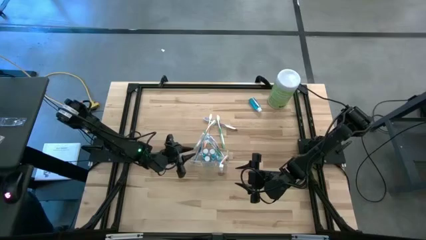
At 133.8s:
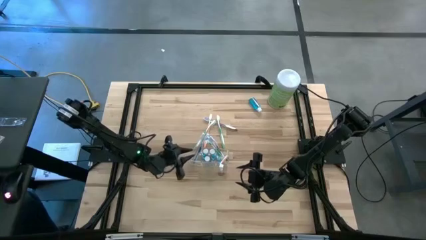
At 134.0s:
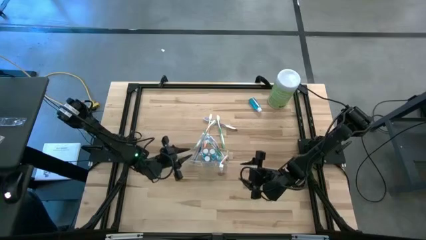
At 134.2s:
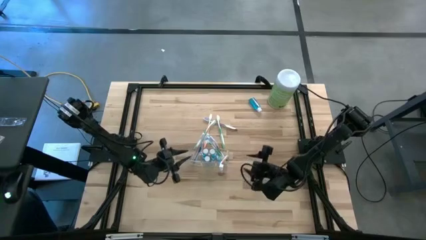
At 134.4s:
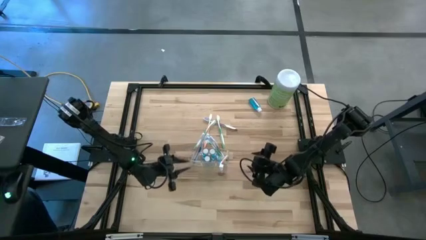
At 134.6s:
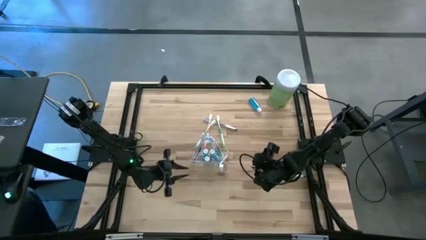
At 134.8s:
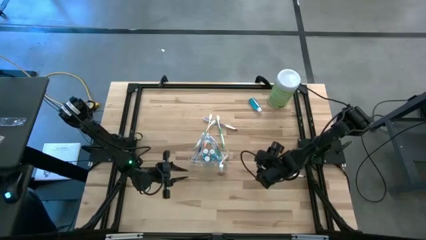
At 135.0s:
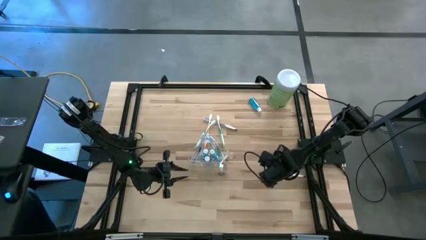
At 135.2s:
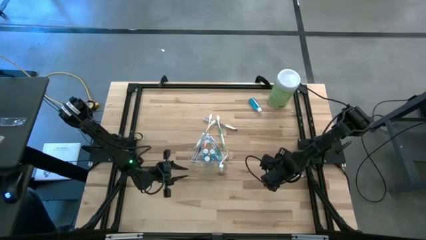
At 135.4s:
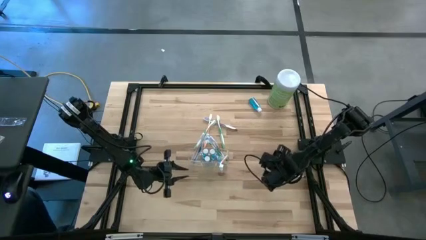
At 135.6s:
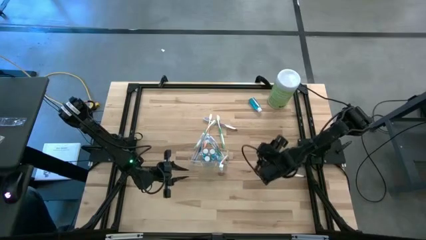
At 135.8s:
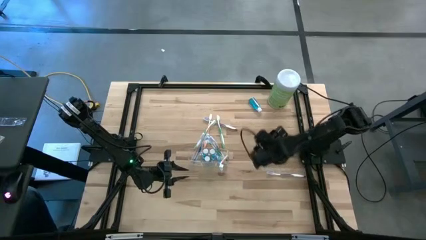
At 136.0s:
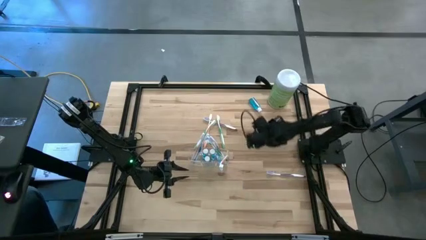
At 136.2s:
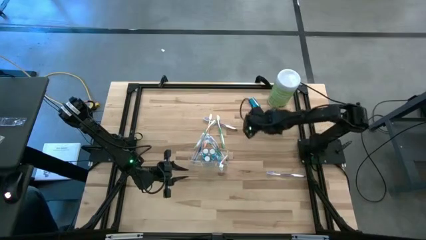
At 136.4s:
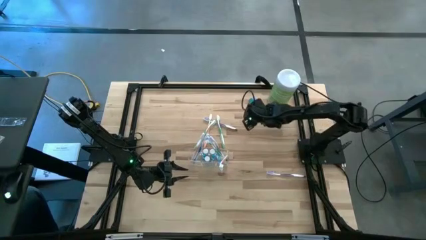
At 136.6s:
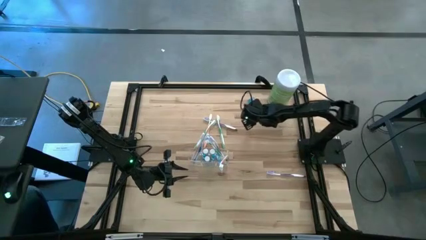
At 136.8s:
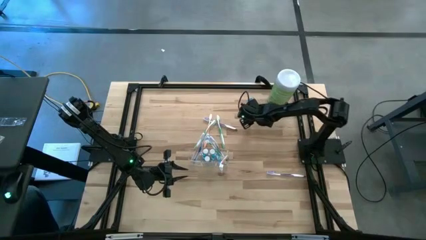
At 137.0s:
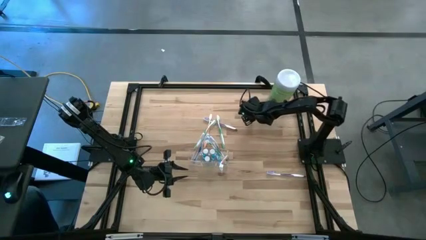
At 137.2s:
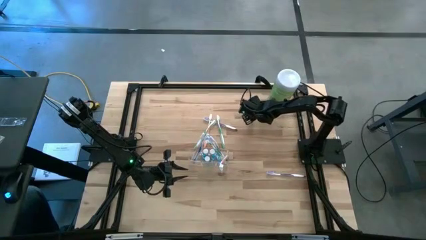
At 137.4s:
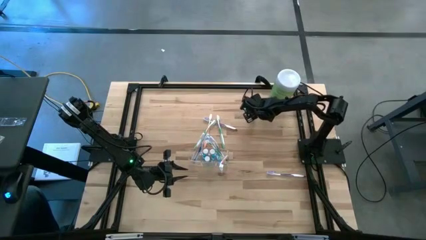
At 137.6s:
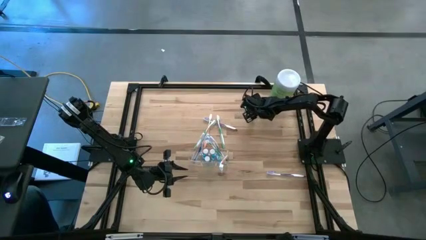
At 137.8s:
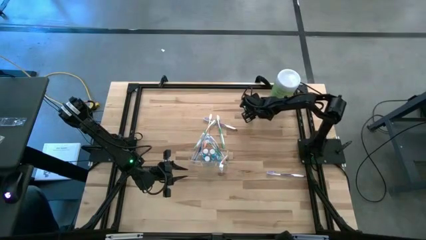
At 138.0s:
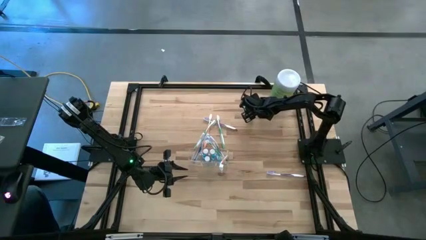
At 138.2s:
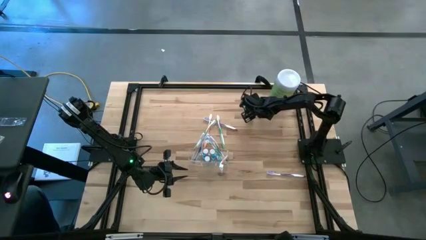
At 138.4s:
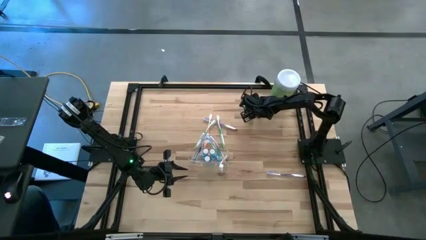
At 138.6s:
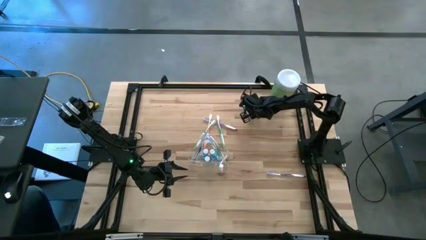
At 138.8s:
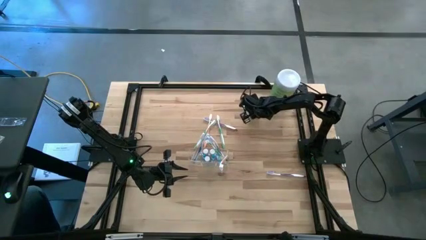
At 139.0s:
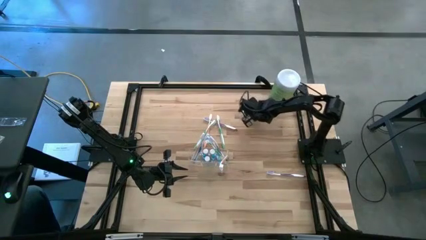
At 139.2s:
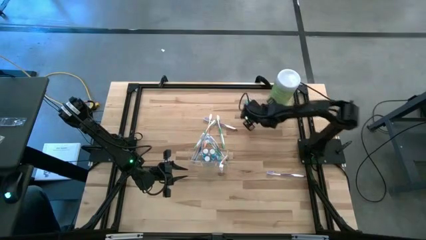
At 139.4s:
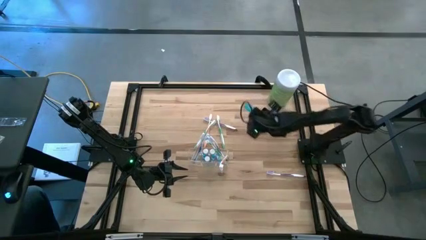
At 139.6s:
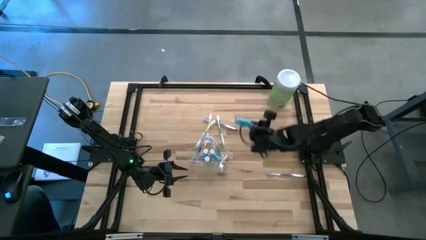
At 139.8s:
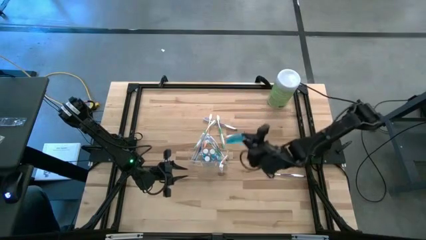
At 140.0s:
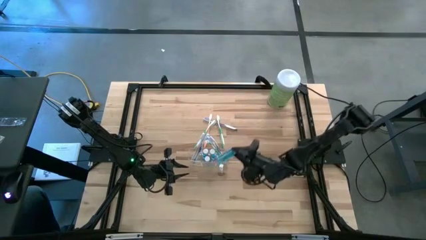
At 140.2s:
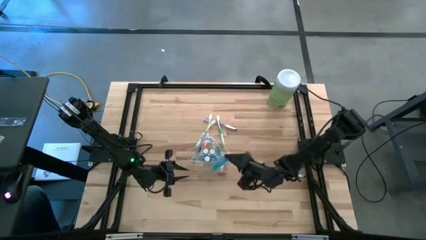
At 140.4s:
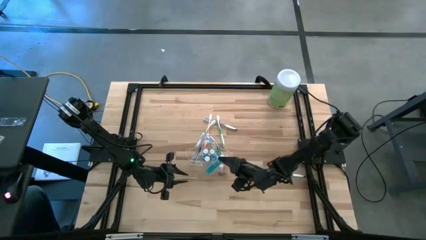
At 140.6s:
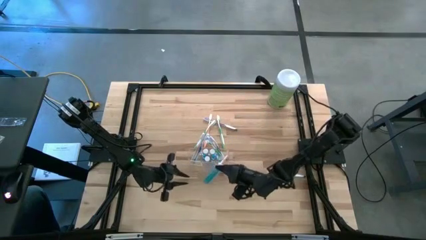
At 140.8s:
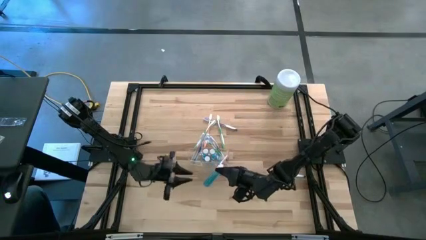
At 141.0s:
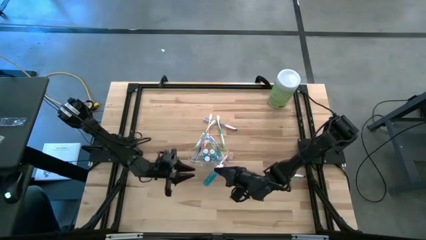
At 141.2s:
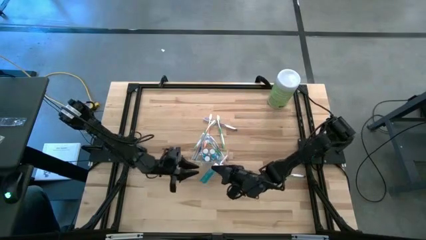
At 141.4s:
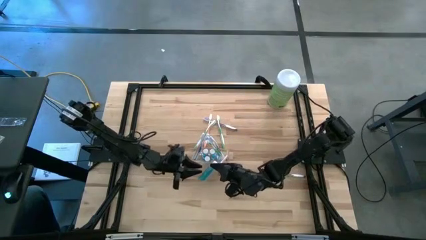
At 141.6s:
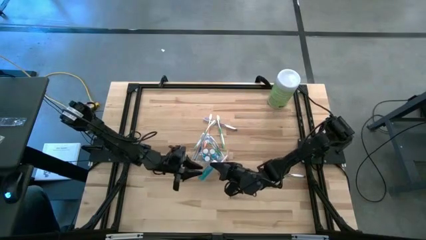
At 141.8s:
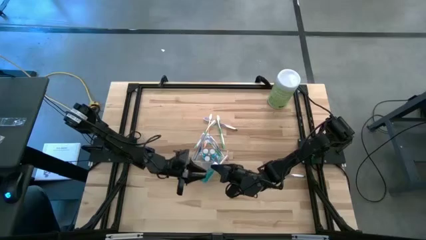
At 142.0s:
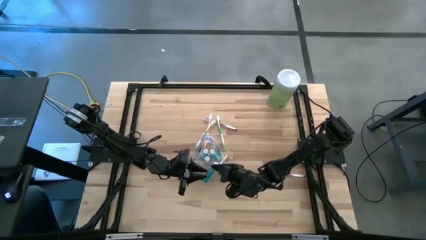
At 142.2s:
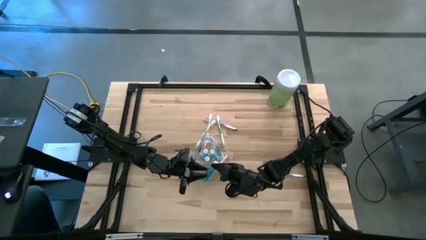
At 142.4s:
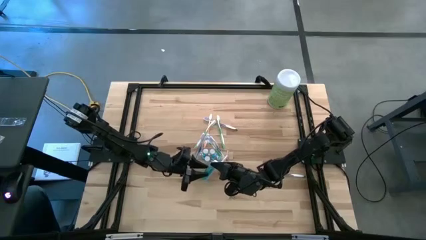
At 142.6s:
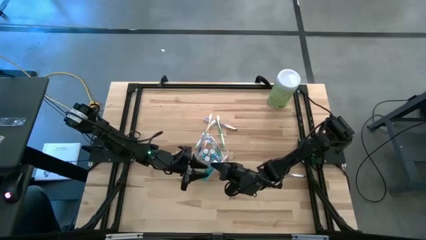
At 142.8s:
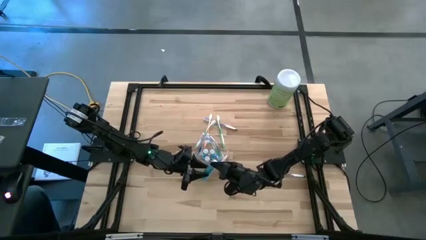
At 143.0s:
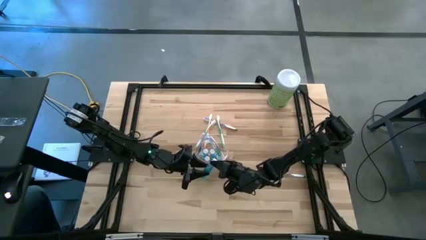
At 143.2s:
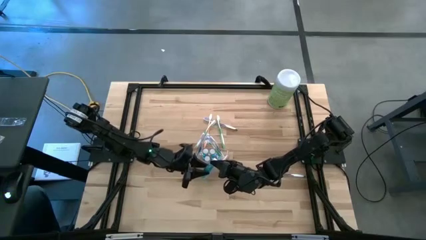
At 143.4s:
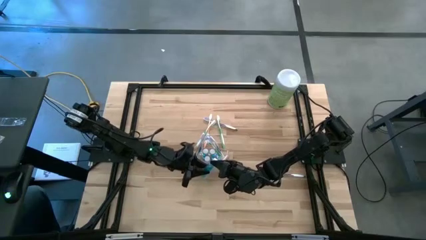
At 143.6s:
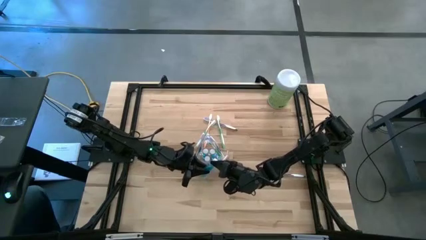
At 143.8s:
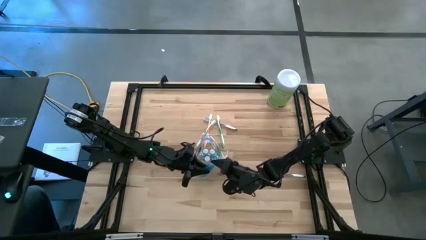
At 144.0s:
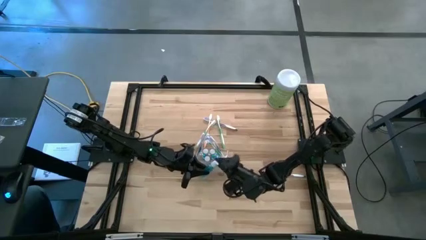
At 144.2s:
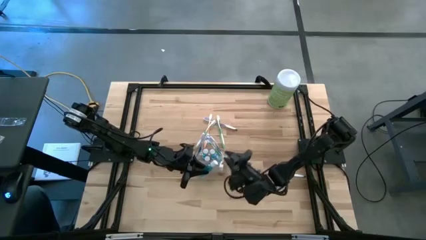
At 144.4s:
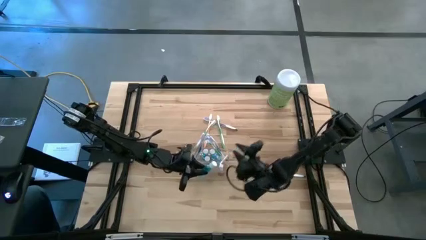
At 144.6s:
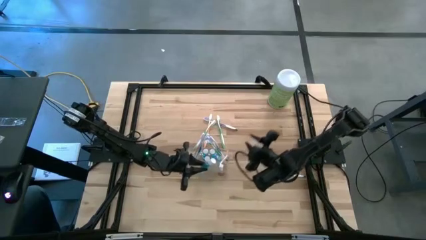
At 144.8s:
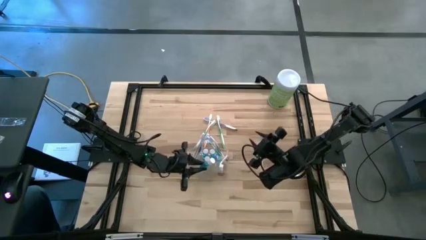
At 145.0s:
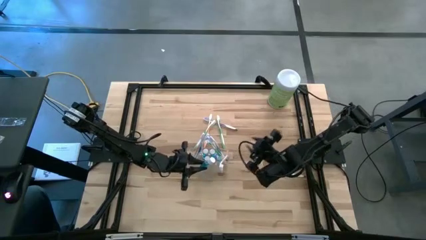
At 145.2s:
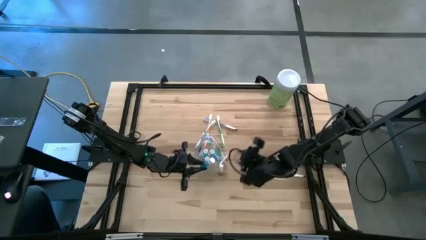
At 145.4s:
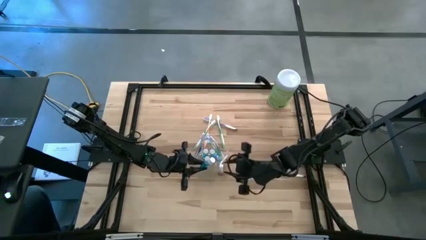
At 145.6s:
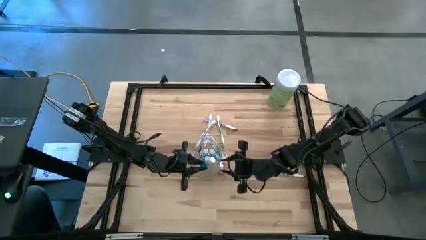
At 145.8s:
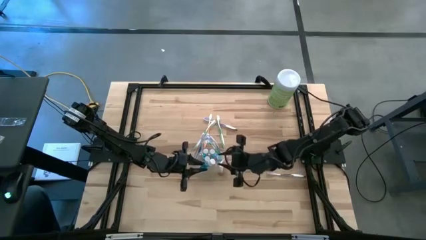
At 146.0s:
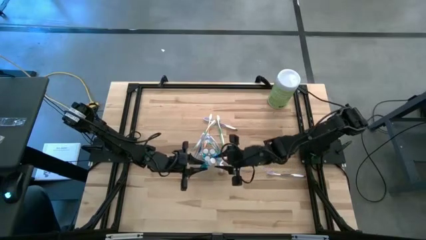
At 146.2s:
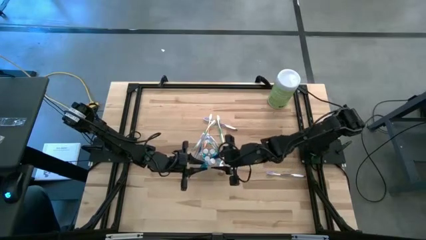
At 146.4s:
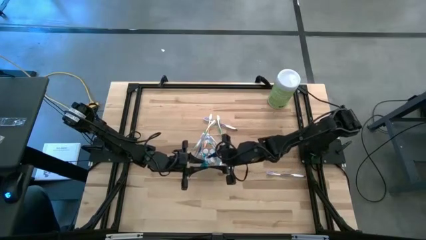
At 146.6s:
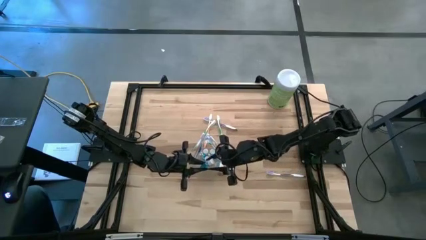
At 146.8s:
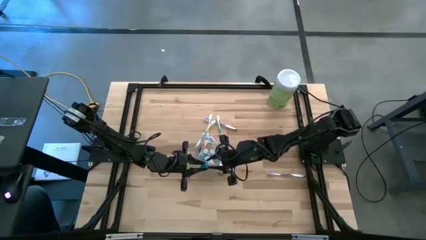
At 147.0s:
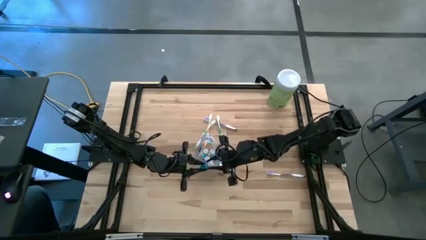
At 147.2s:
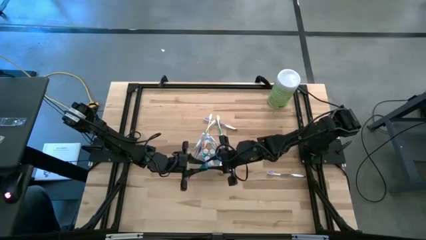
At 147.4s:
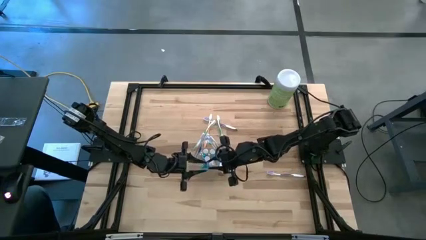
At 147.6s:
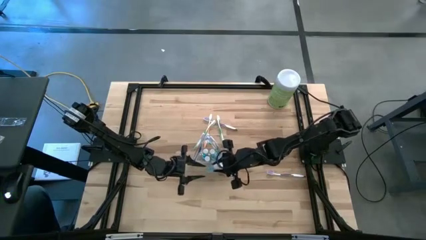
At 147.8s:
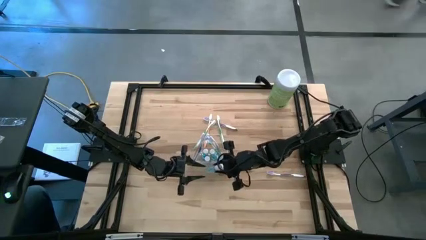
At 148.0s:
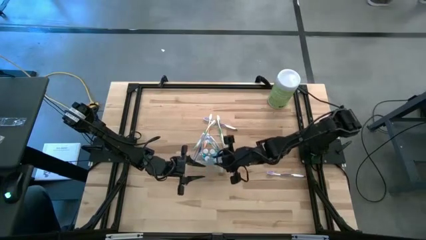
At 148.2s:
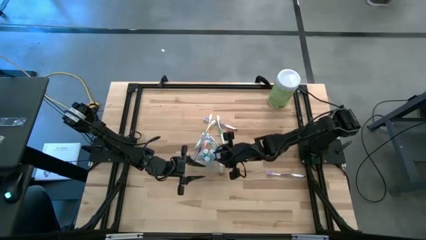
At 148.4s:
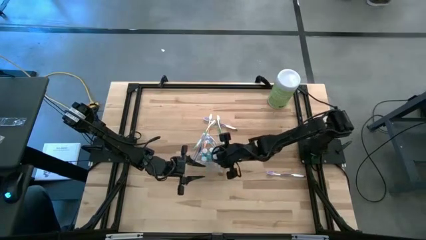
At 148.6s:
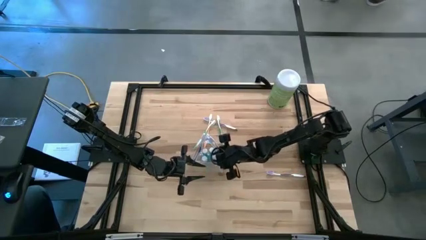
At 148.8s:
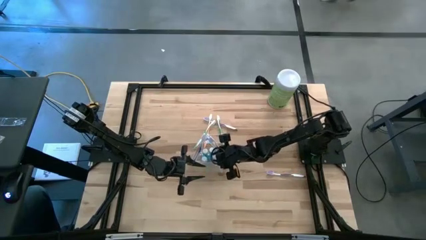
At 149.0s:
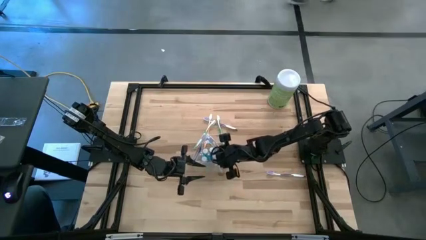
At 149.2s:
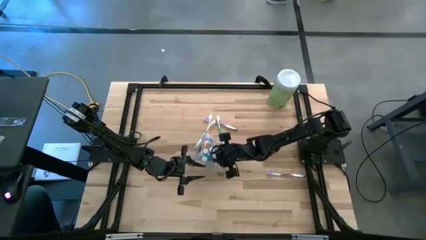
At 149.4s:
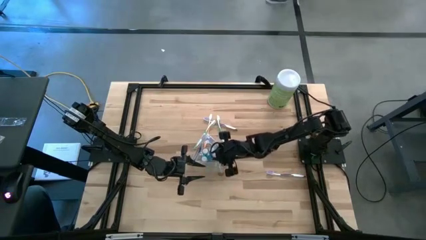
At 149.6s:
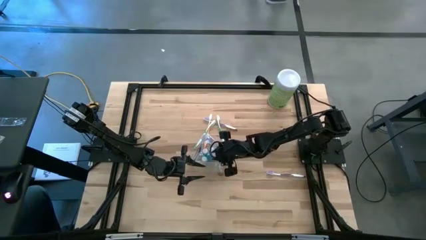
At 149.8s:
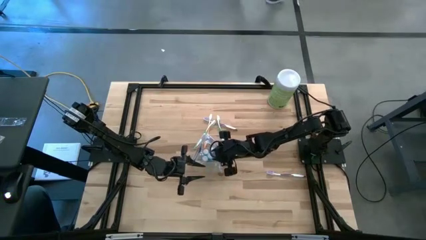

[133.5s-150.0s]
Task: Pick & Place toothbrushing station
Put the mouthwash into the center of the transparent organizer
